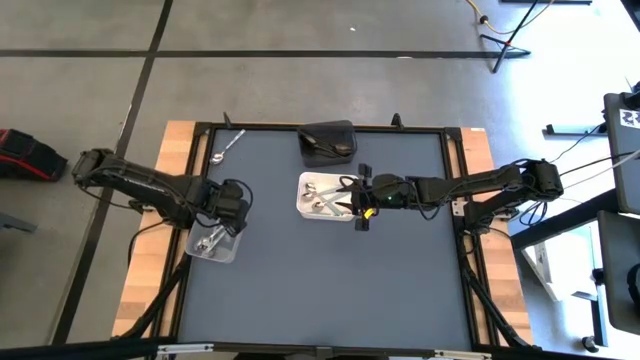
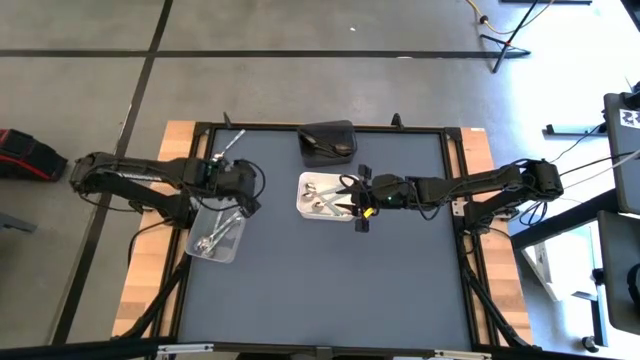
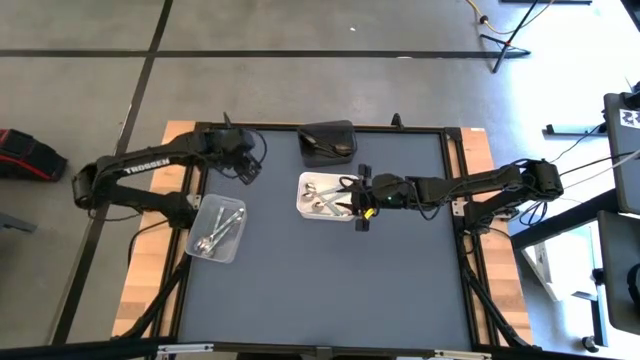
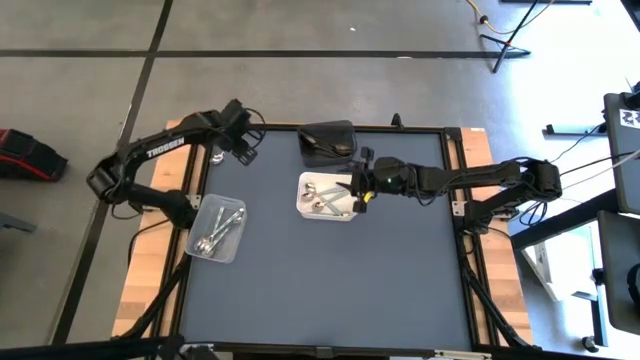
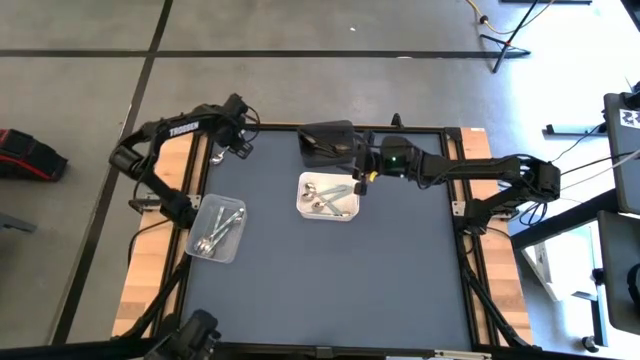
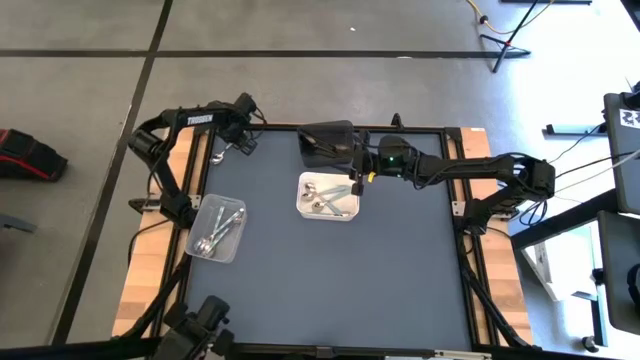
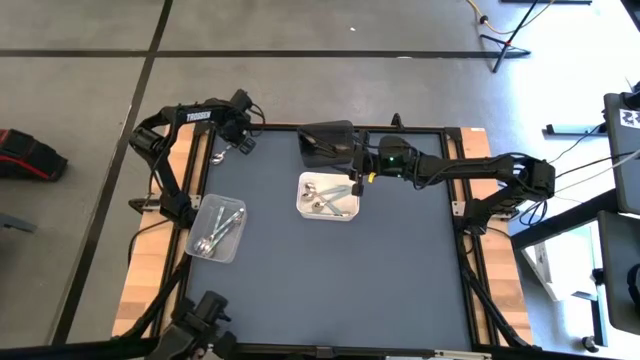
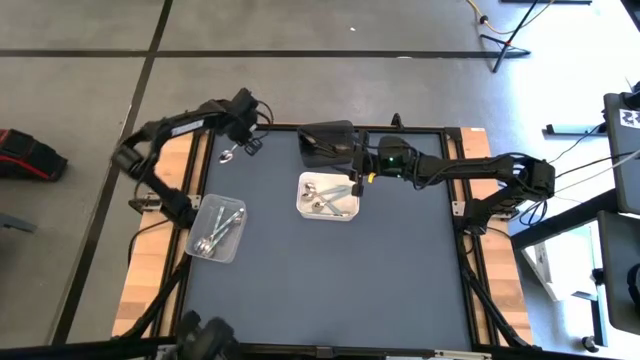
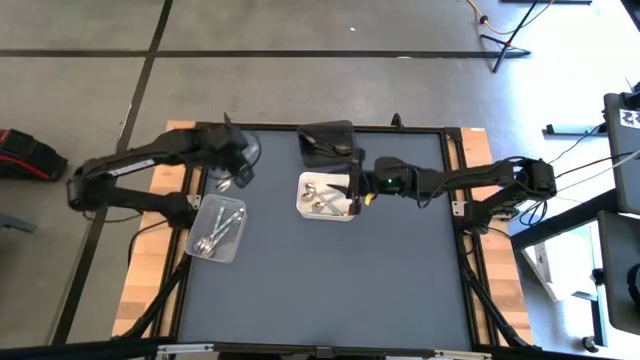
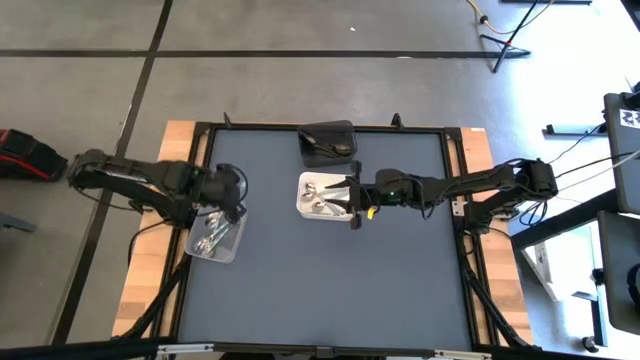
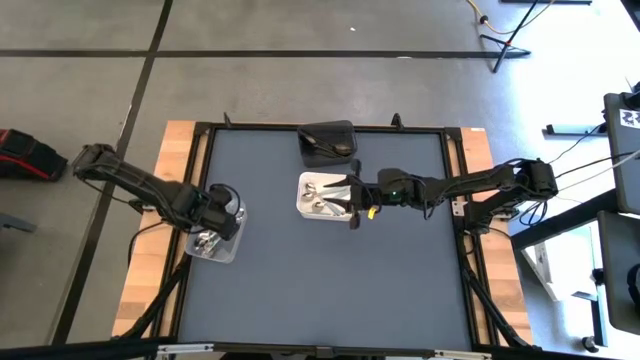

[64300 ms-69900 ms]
Task: Sort silverware by color (type)
Put the white green spoon into the transparent bin

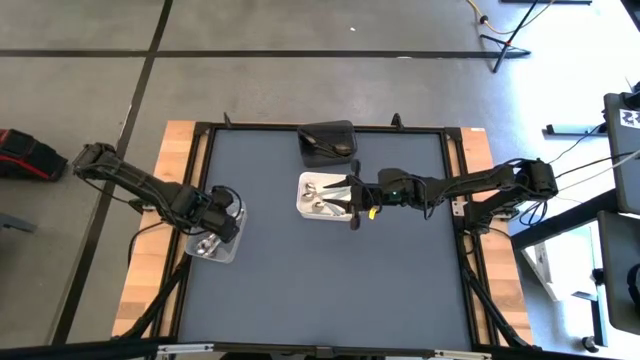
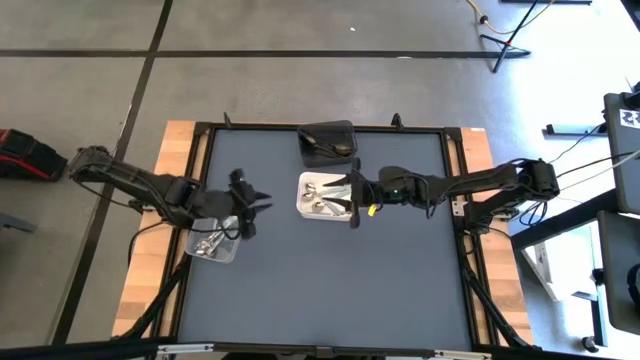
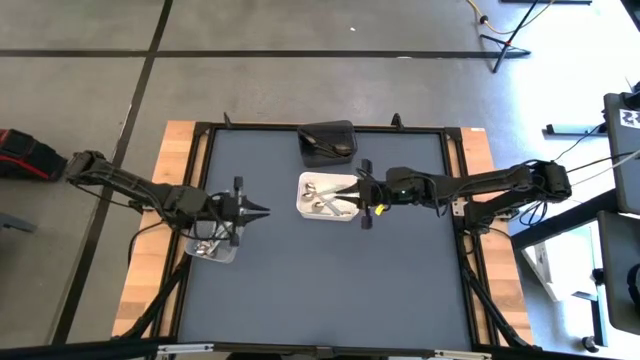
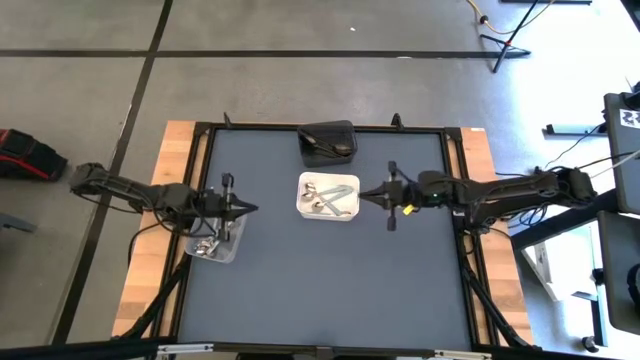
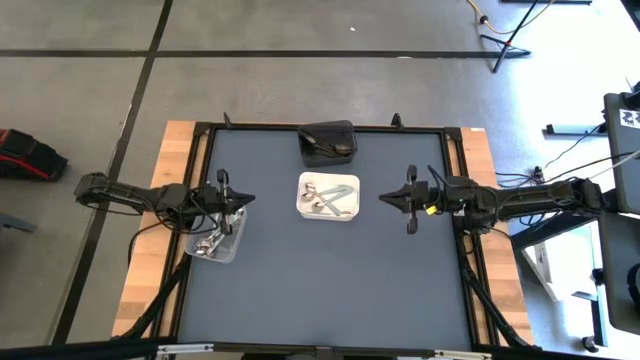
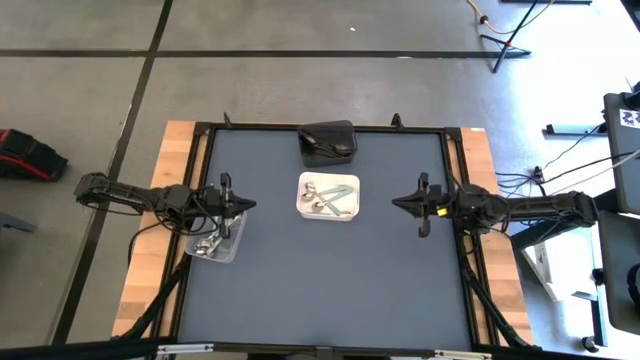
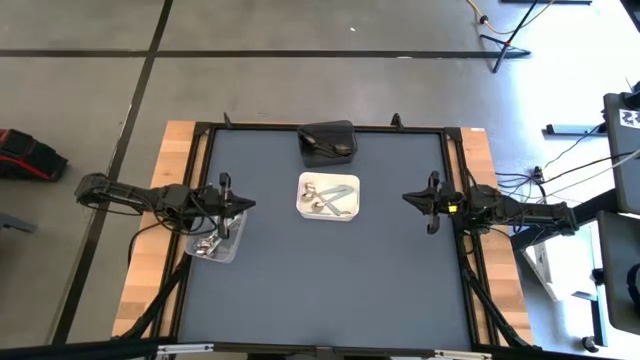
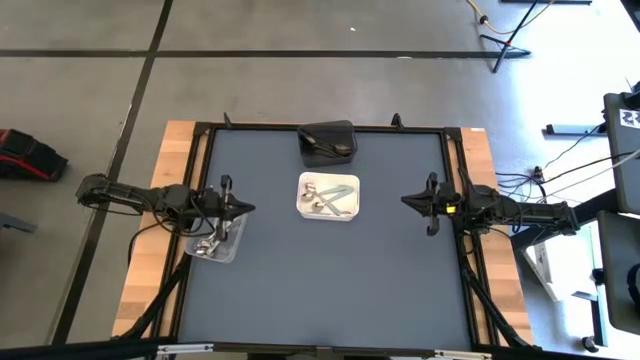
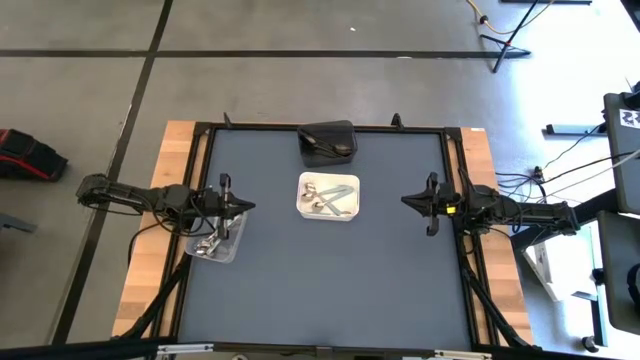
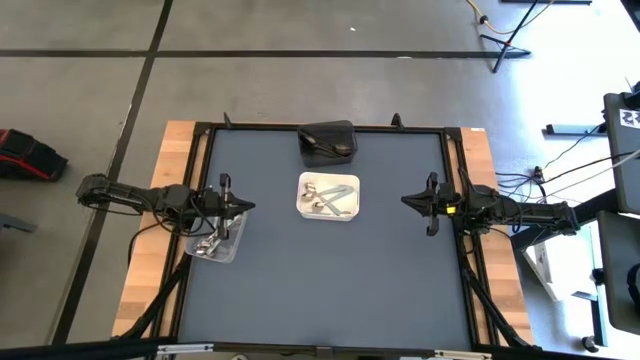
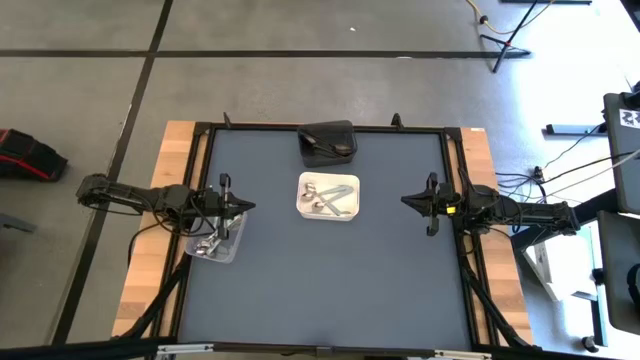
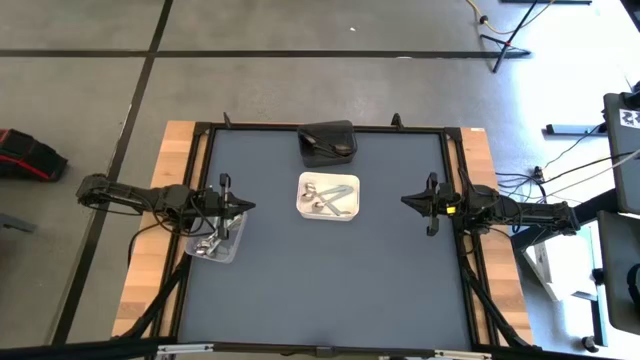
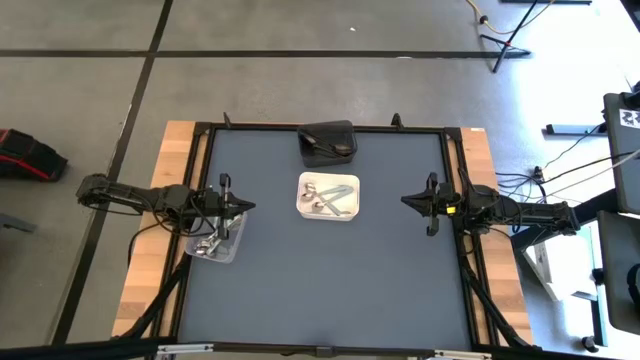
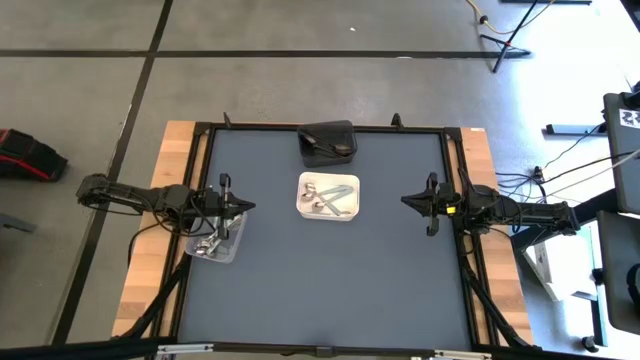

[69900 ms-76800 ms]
Return to Home Position

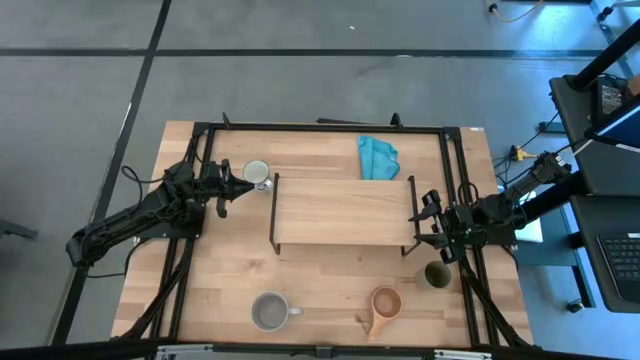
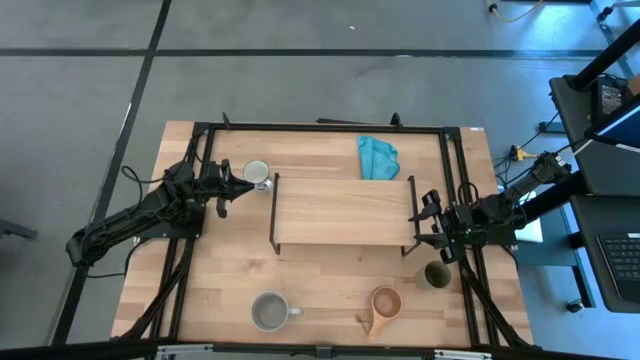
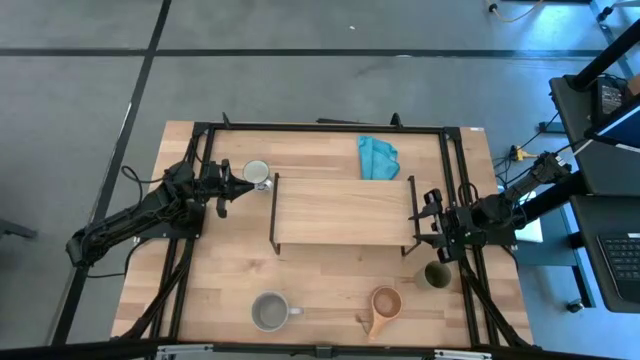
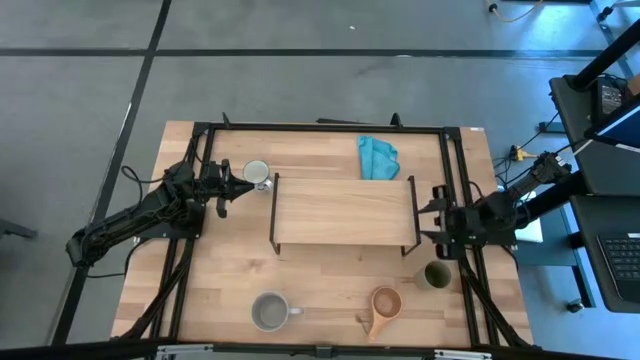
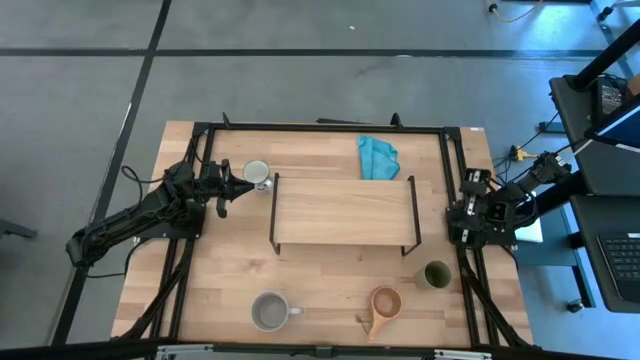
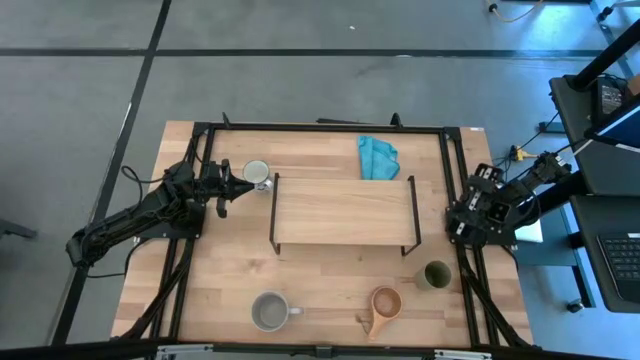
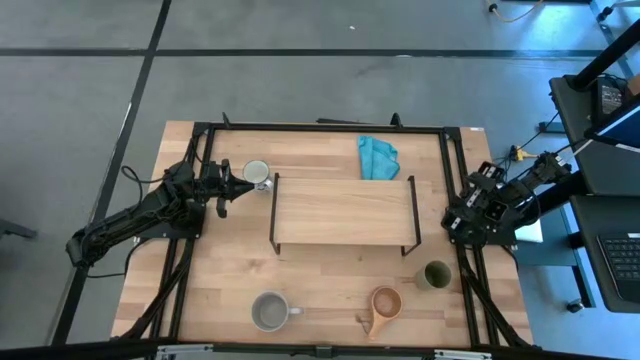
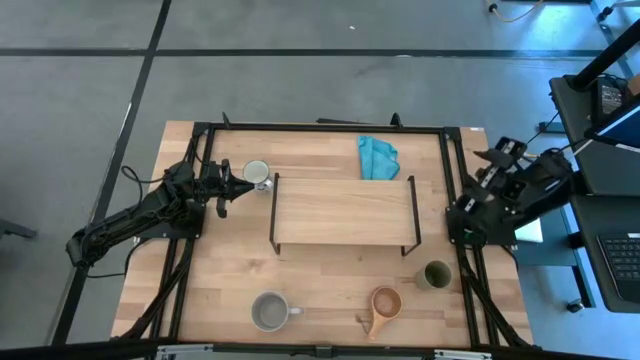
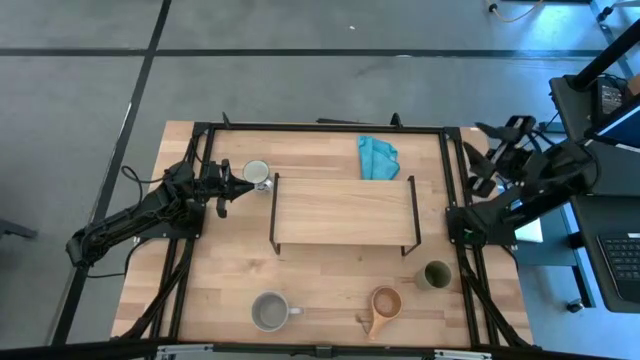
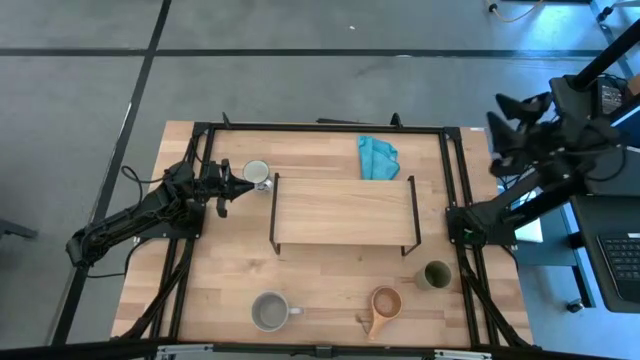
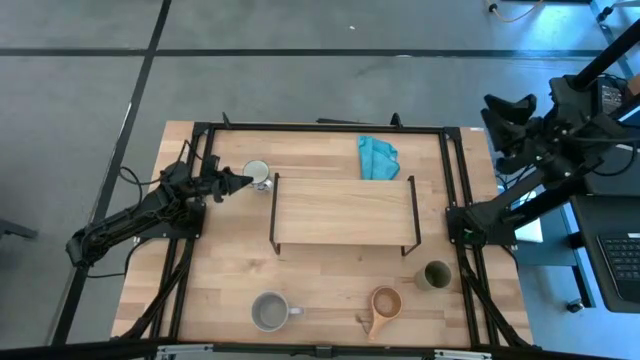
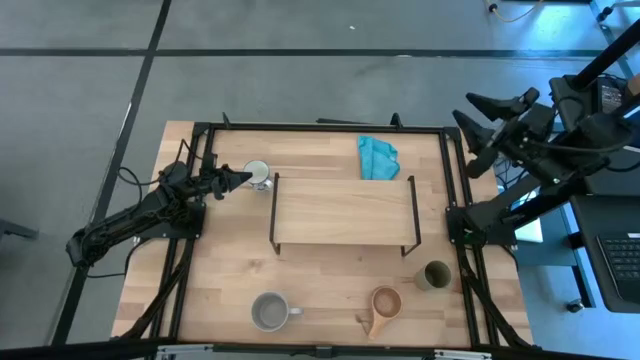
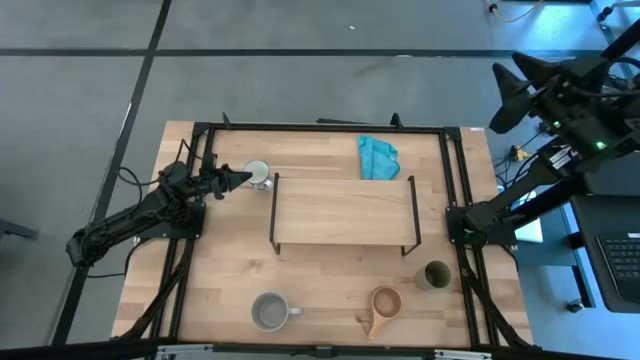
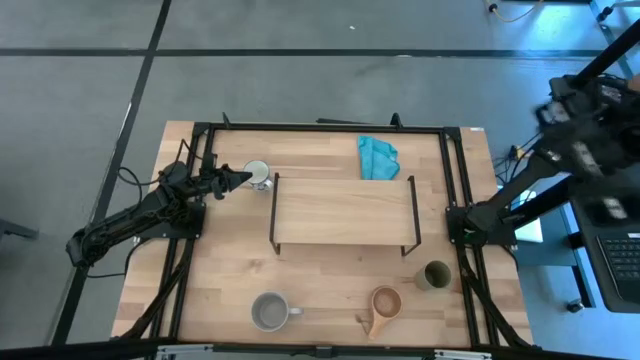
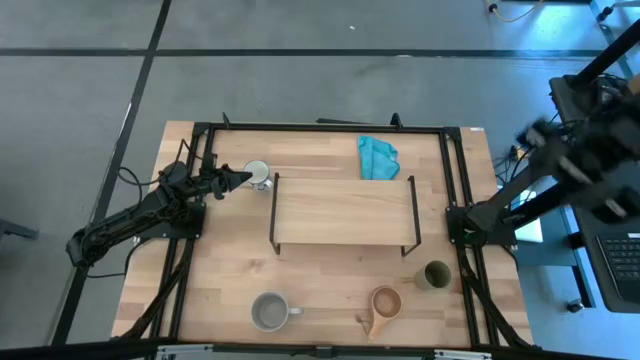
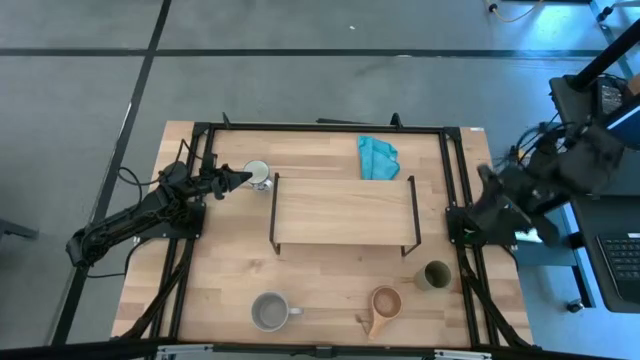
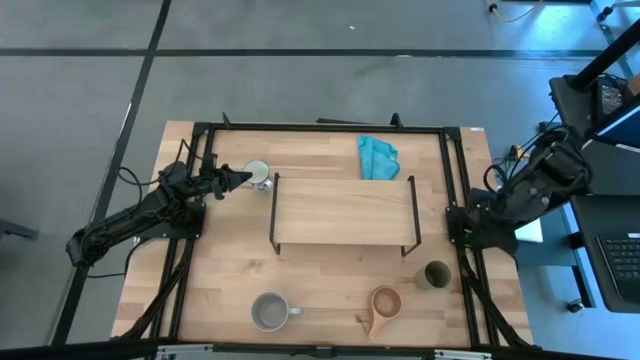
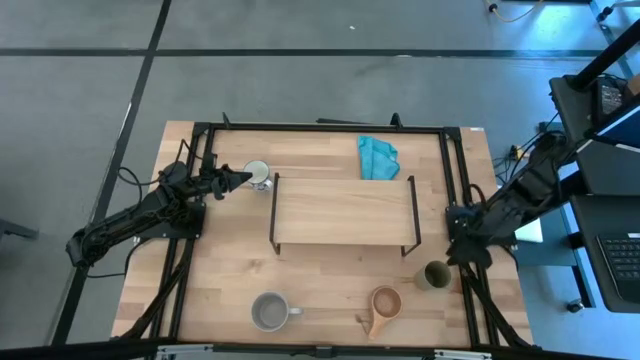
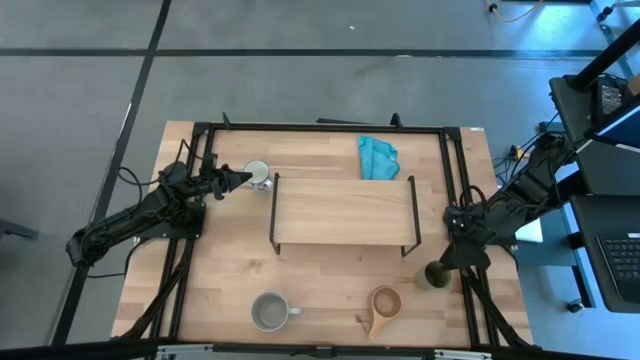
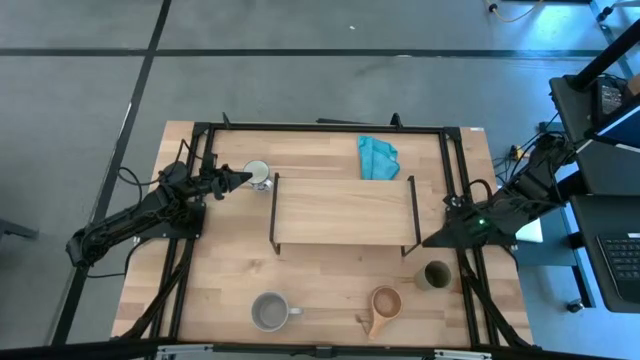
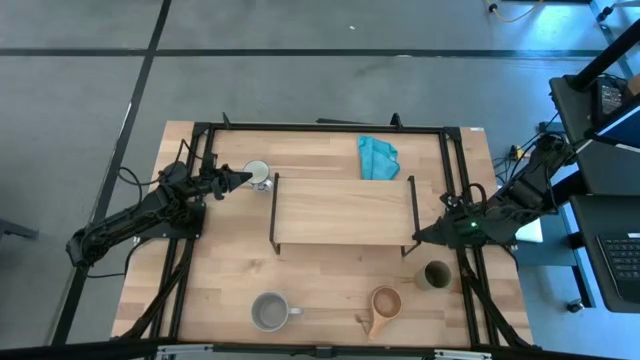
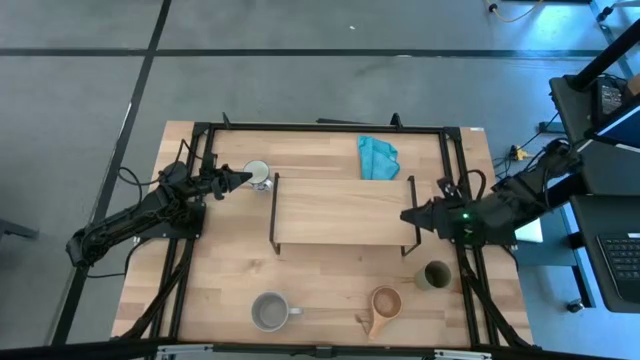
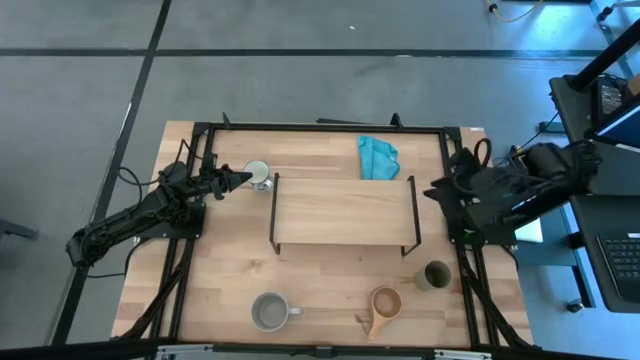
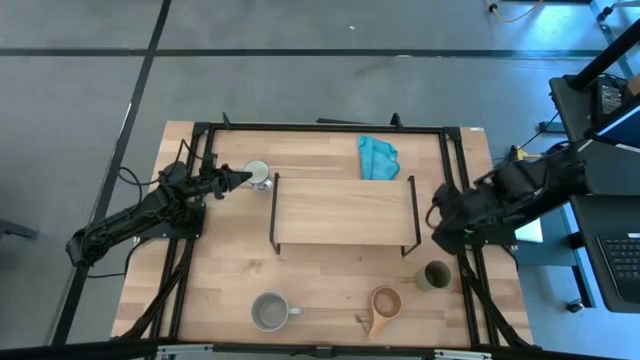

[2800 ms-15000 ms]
Task: Stack small to large cups/mugs on shelf
Put the gray cup on the shelf
